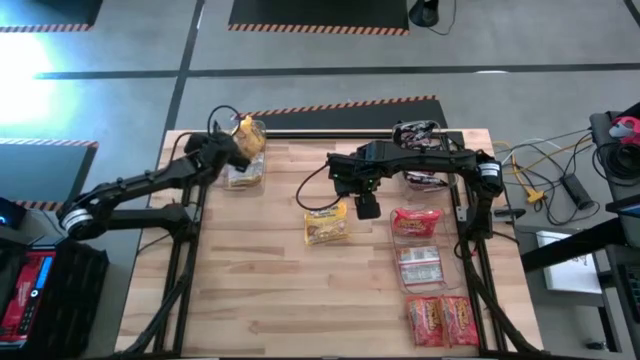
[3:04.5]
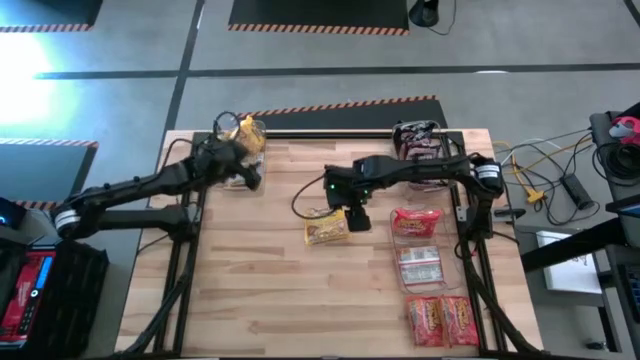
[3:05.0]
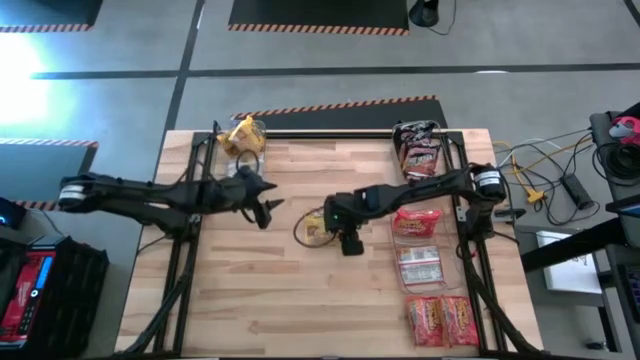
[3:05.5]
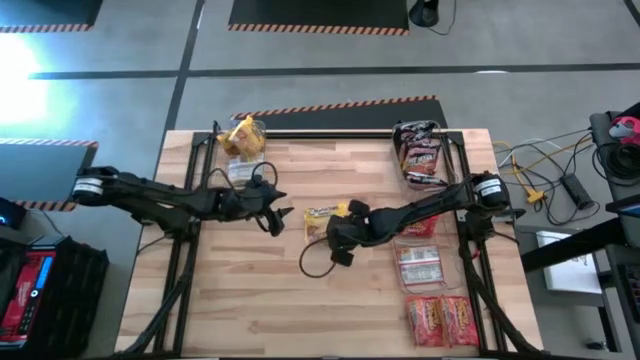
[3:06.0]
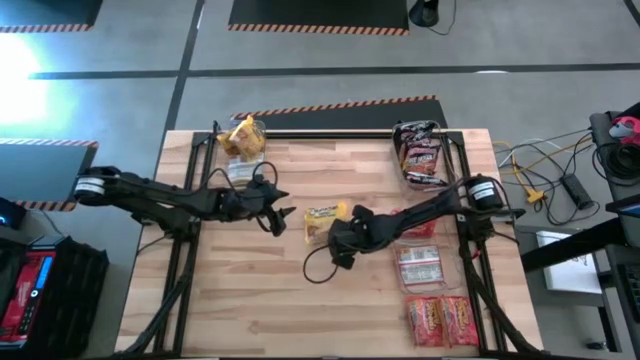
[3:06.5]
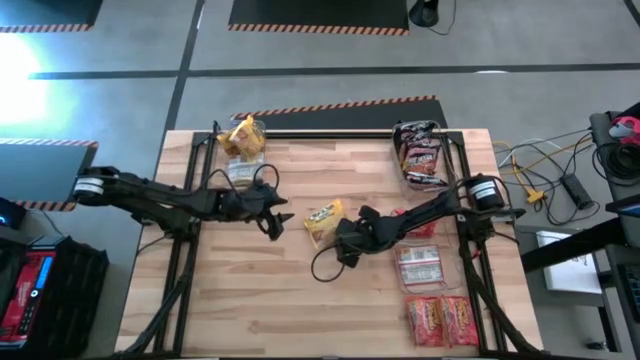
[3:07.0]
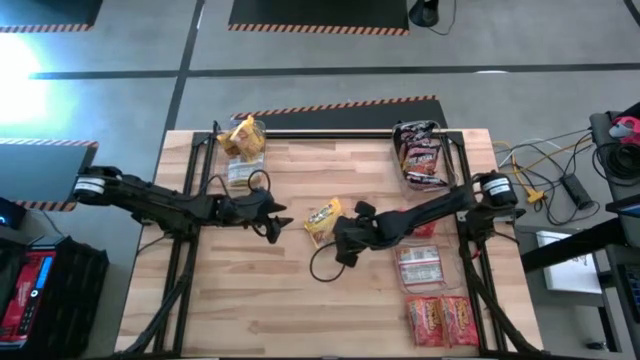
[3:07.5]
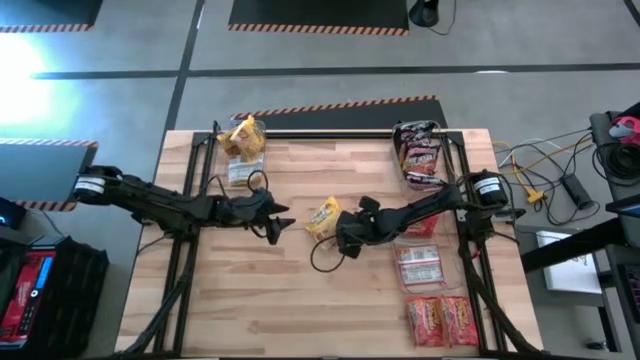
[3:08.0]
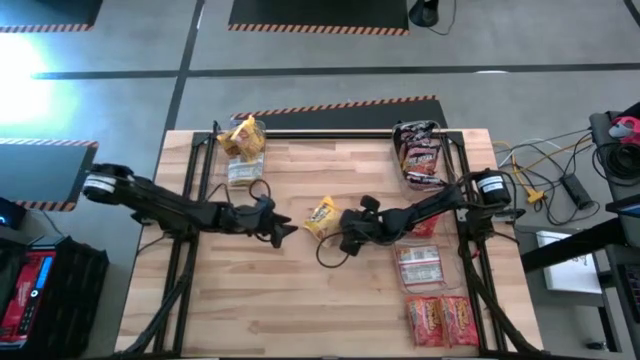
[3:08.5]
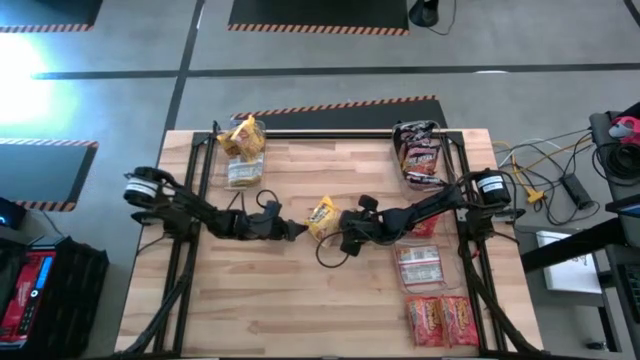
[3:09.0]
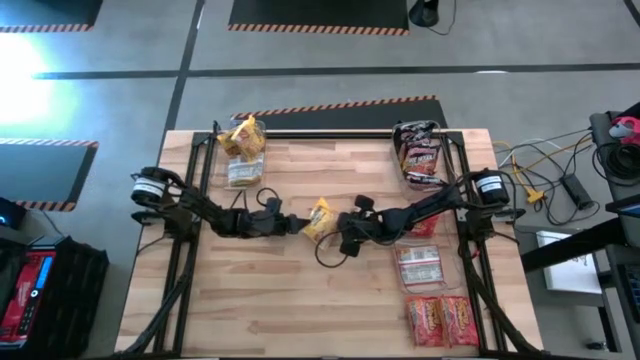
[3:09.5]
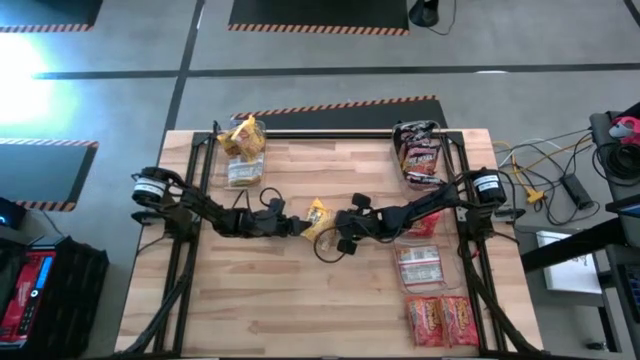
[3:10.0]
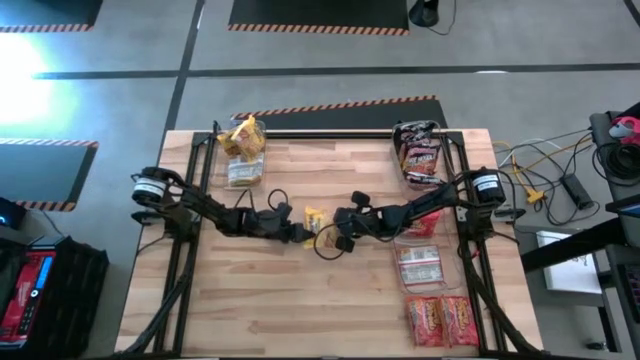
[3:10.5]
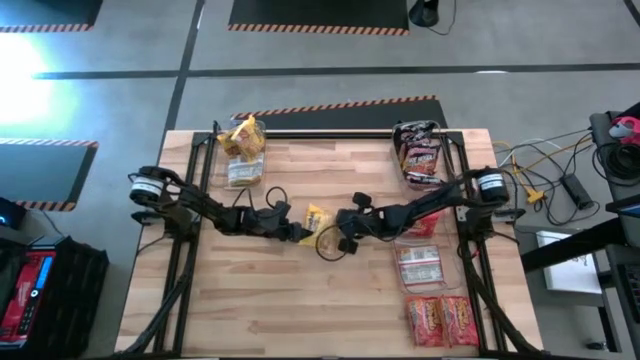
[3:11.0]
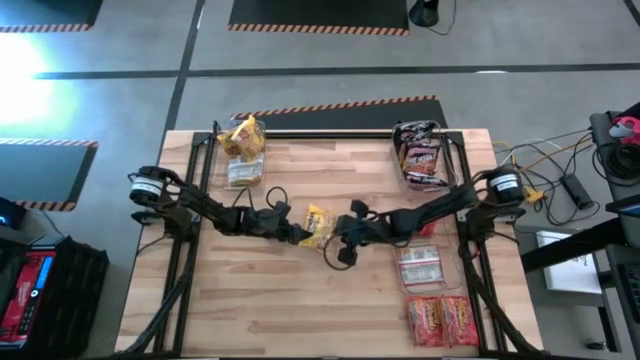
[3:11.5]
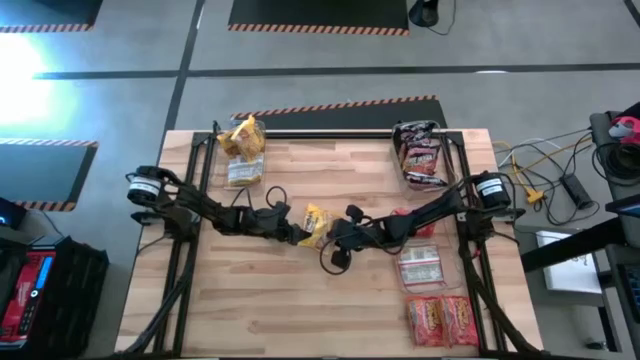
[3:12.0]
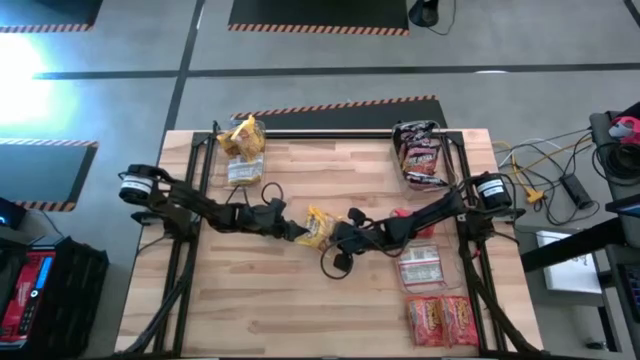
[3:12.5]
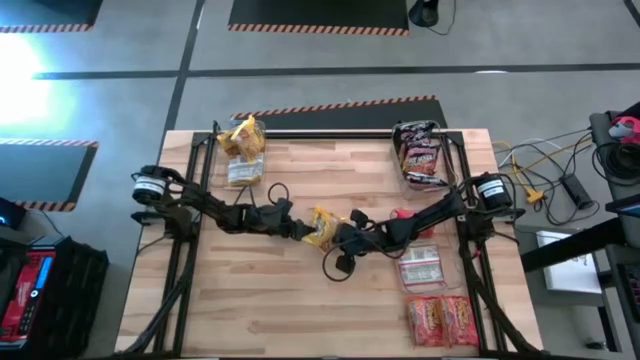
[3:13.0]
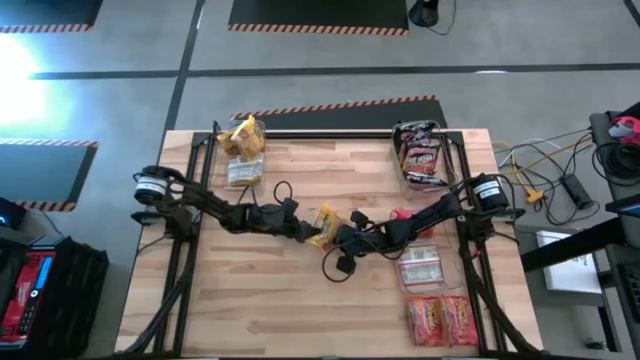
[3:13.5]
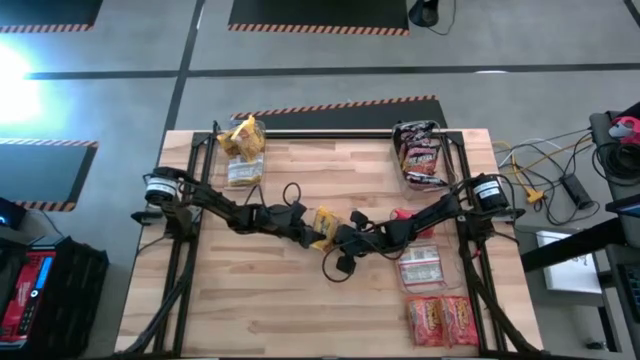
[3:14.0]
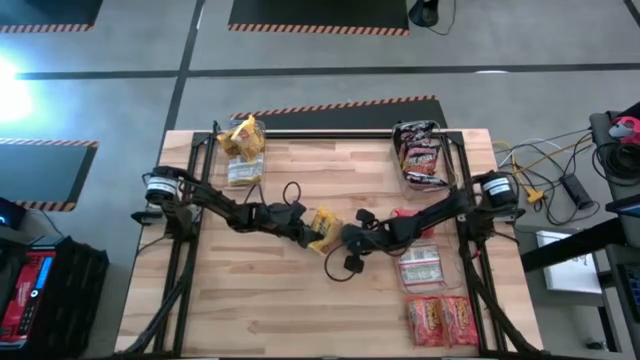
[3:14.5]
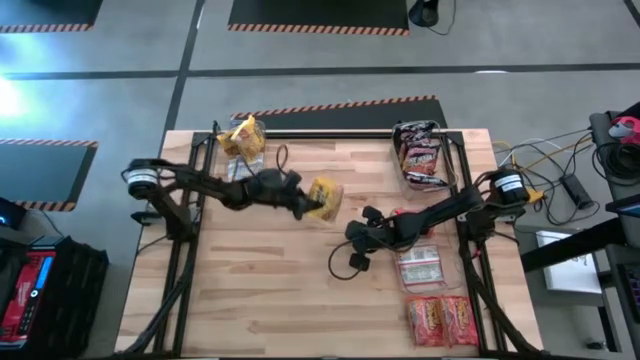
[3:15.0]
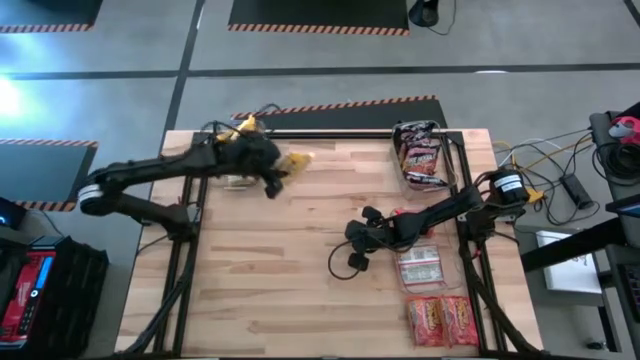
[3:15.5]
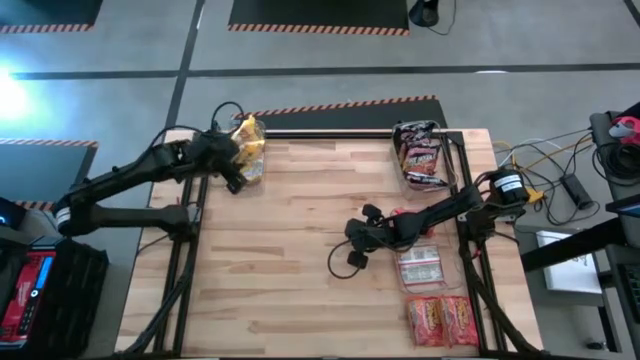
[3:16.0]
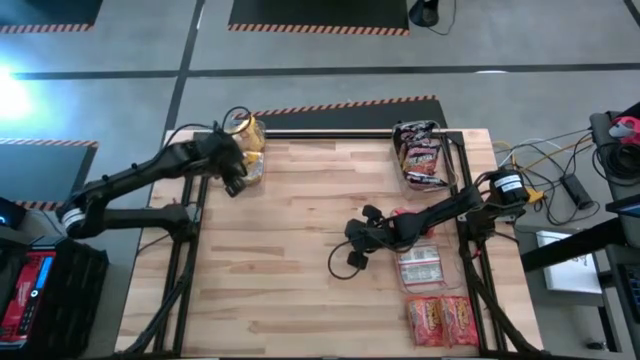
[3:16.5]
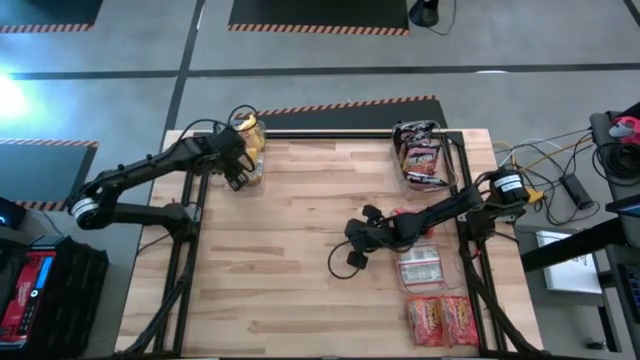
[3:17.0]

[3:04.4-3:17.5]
Task: Sort Maruchan noodles
Put the yellow noodle pack into the top left transparent bin

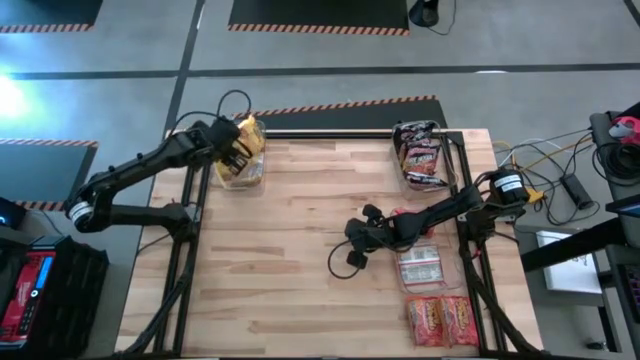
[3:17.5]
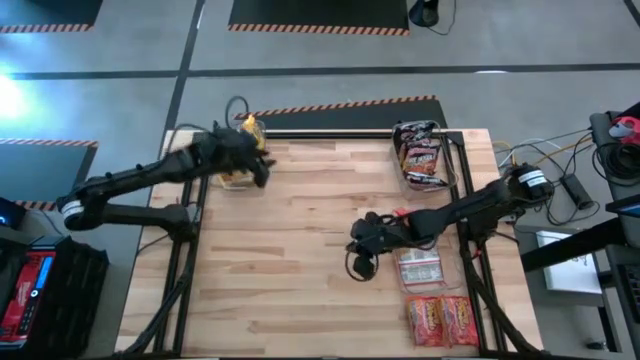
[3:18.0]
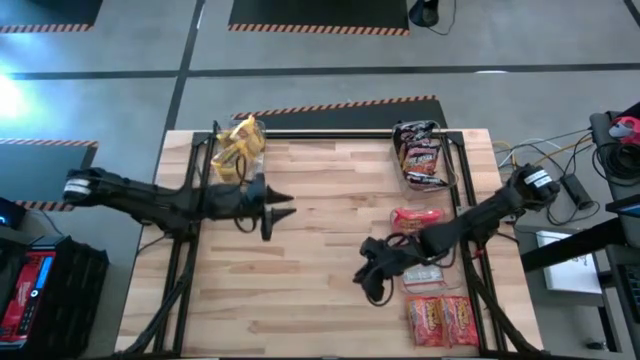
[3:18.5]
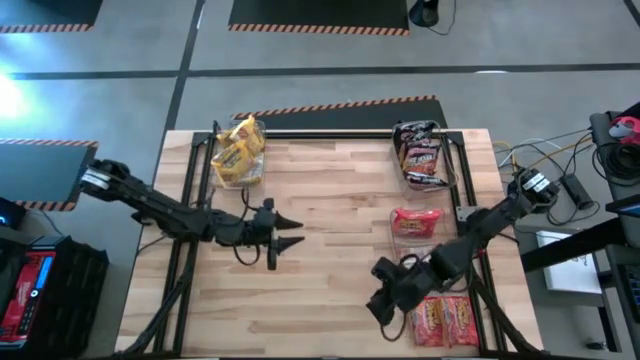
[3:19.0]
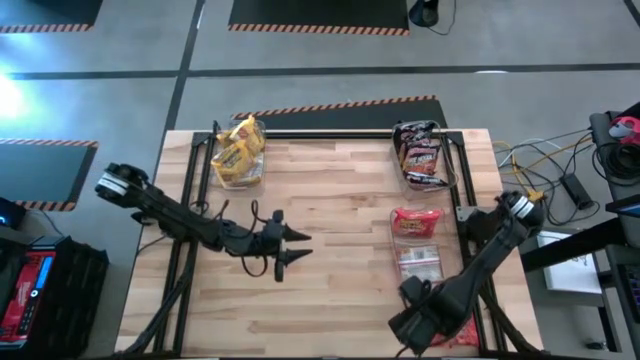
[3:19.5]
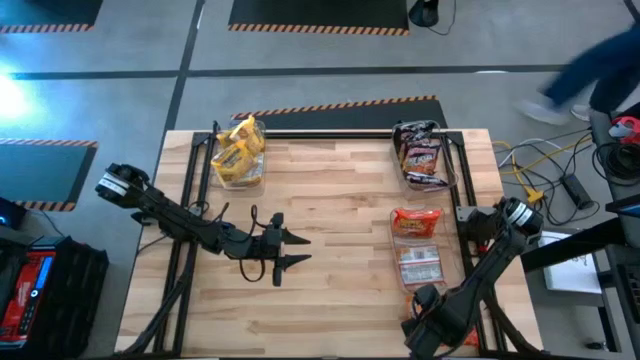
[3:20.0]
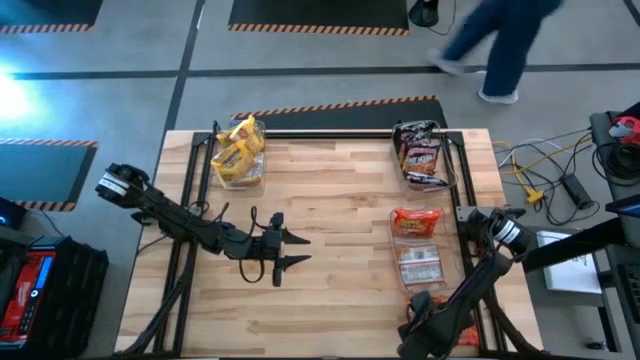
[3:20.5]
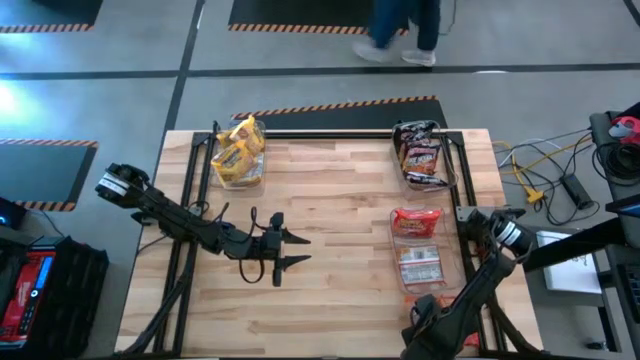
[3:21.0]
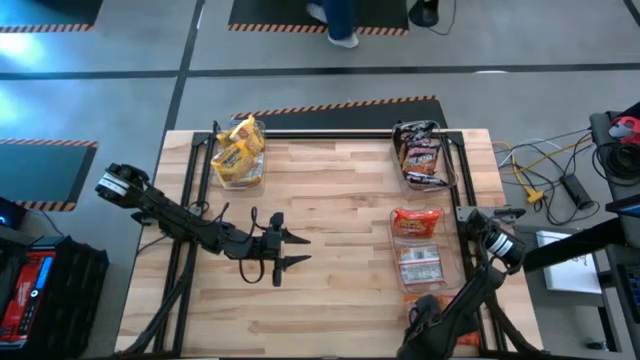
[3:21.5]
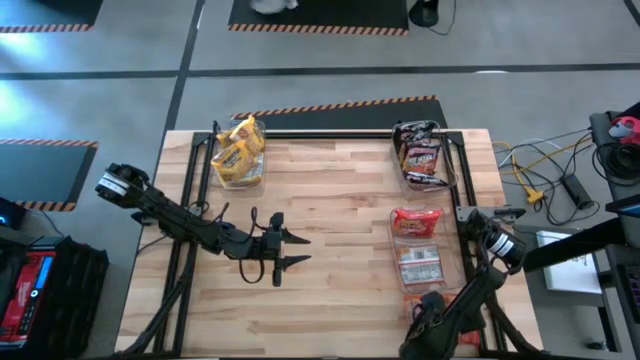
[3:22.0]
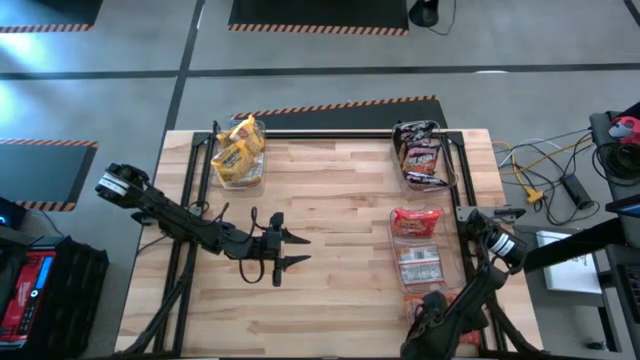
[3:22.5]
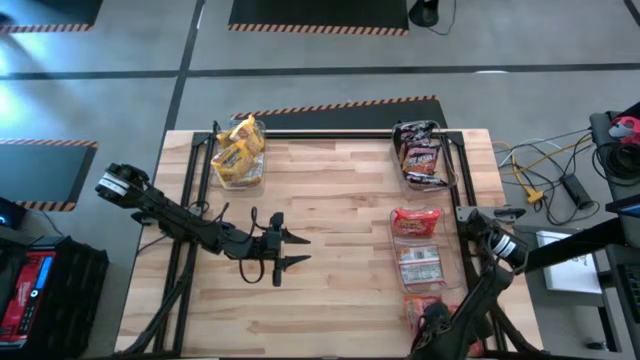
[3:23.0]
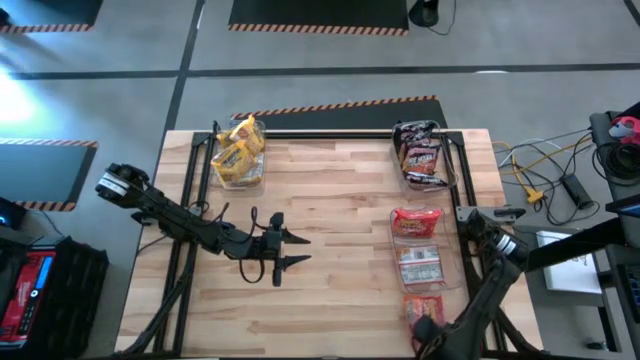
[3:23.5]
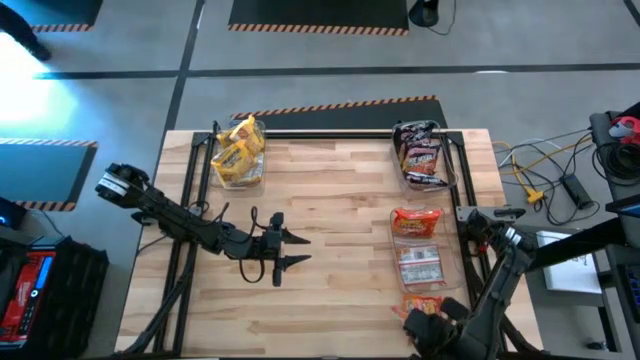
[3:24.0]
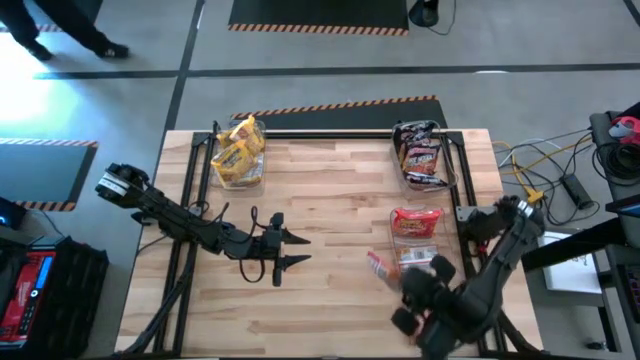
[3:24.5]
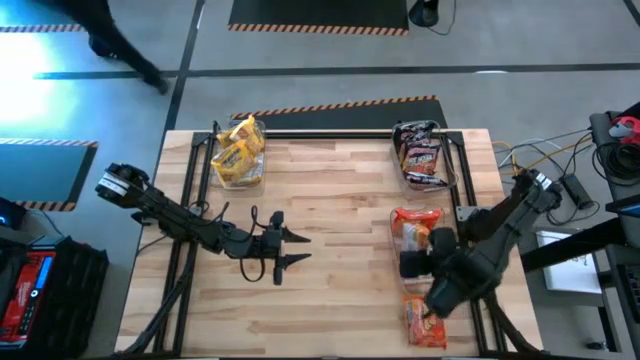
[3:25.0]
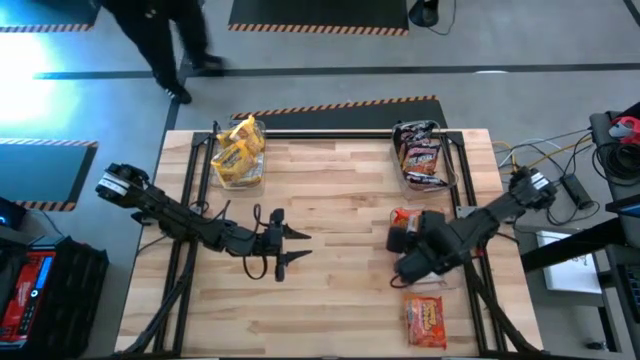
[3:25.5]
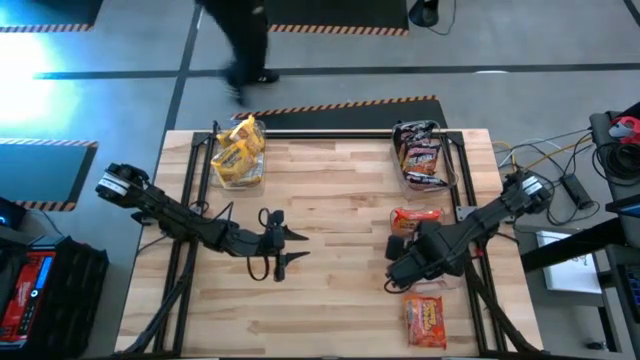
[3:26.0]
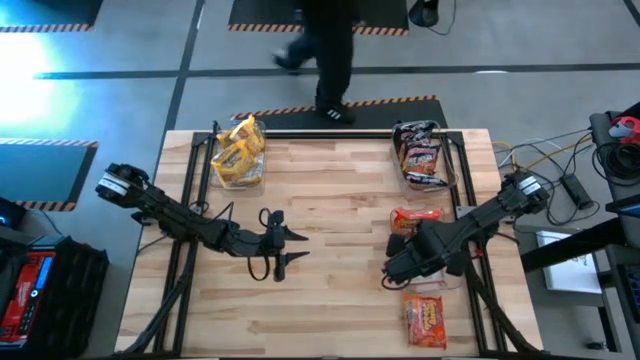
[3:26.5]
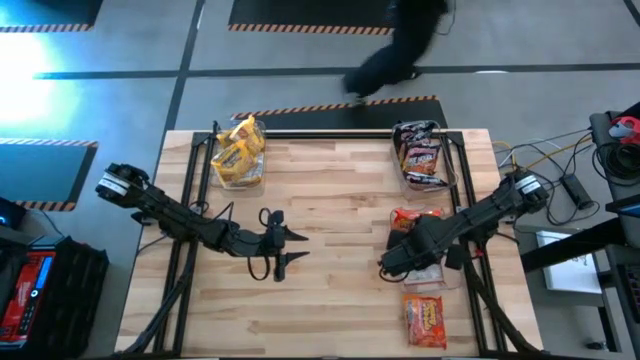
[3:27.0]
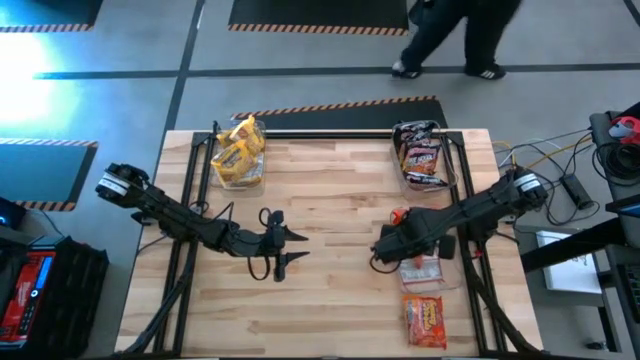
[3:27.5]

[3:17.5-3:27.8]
Put the orange noodle pack into the bottom transparent bin
